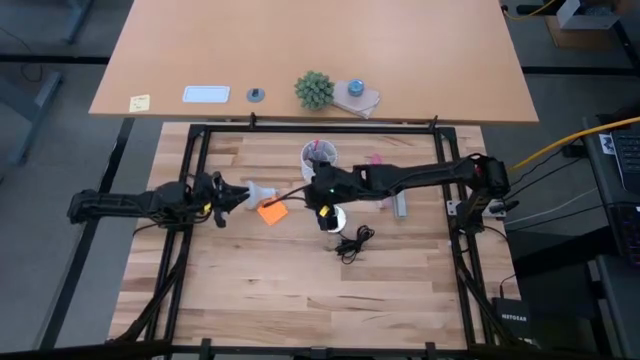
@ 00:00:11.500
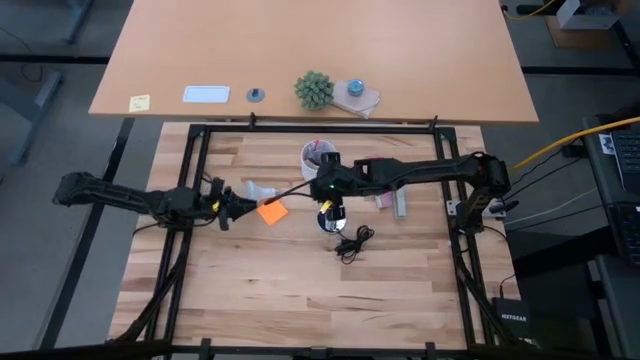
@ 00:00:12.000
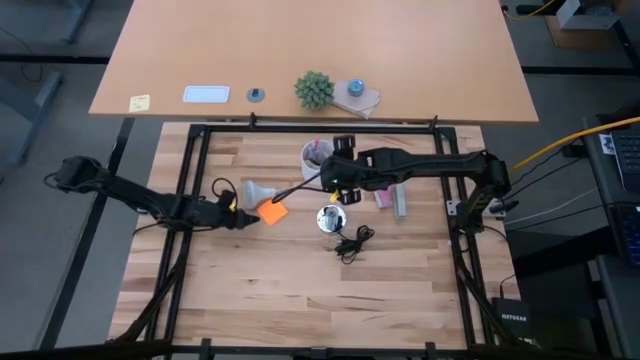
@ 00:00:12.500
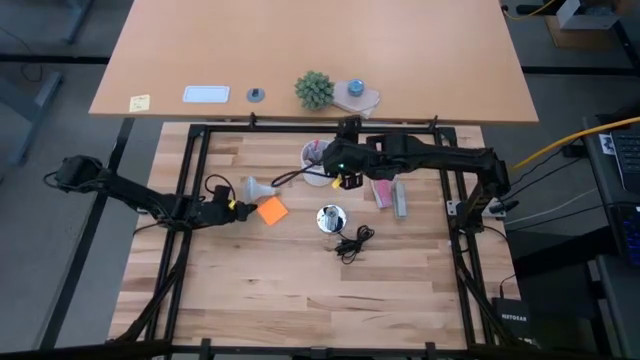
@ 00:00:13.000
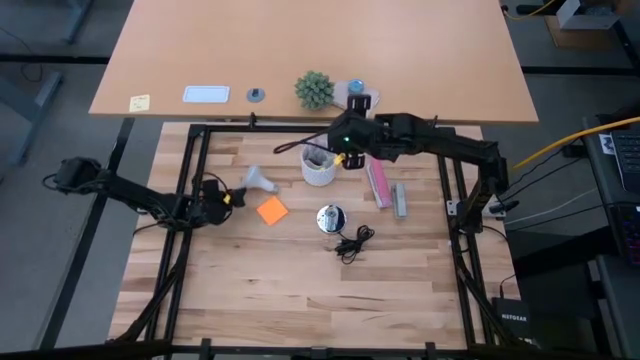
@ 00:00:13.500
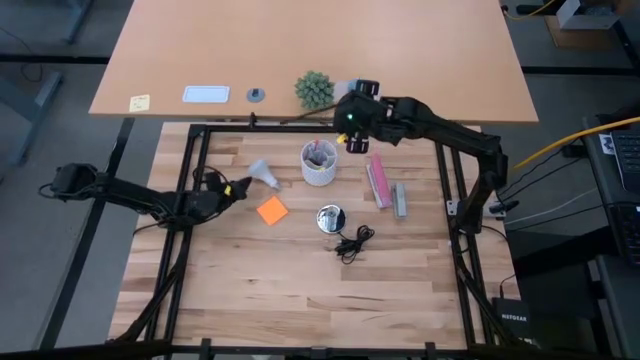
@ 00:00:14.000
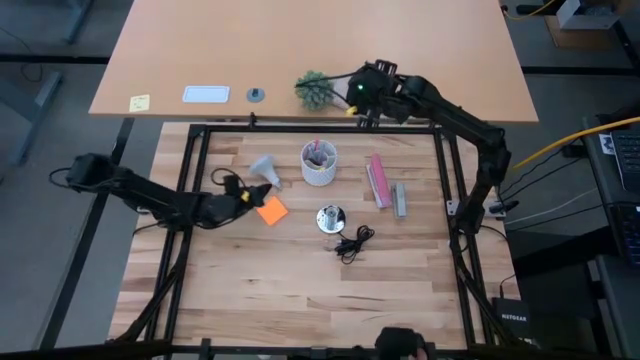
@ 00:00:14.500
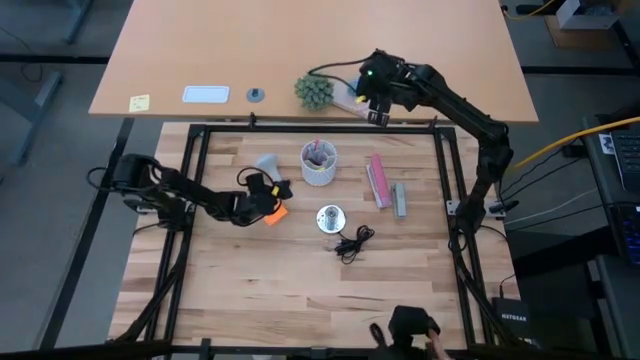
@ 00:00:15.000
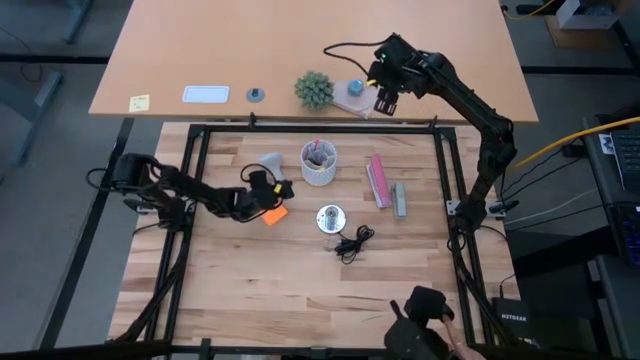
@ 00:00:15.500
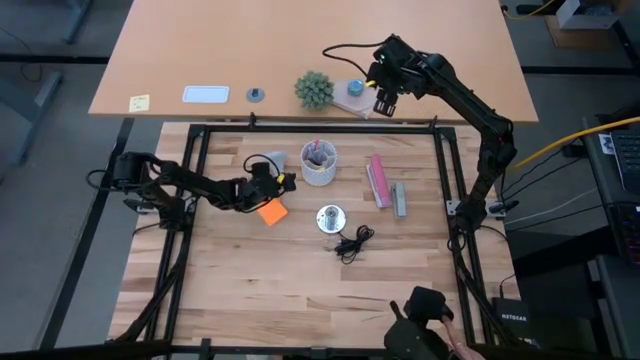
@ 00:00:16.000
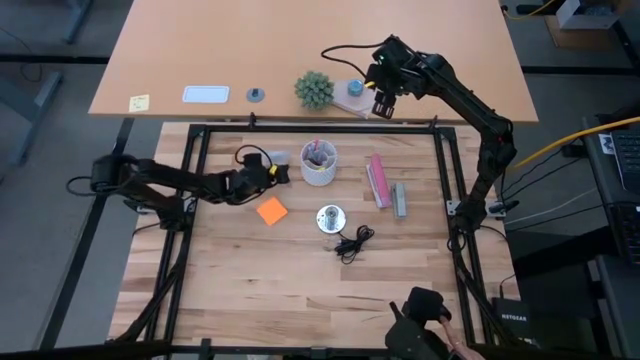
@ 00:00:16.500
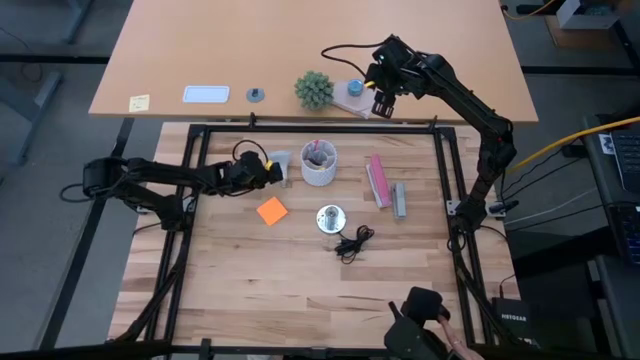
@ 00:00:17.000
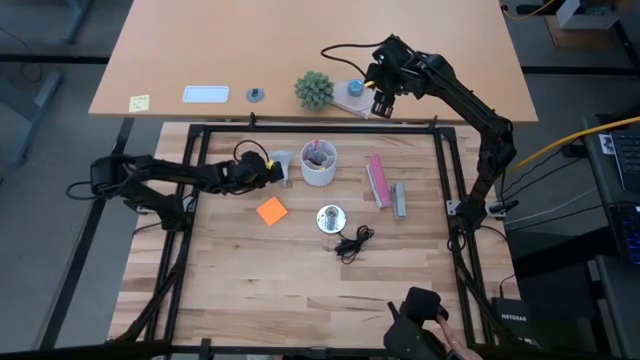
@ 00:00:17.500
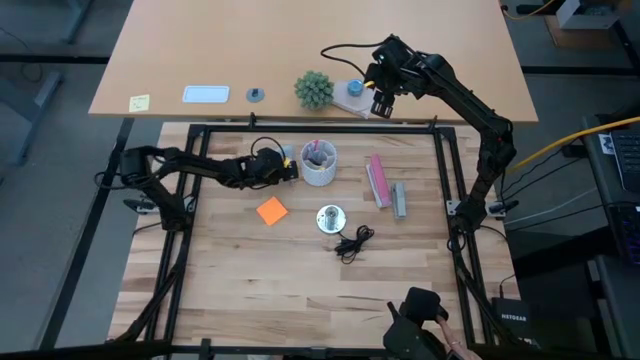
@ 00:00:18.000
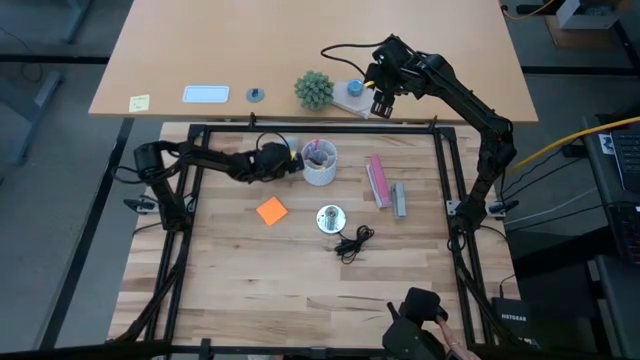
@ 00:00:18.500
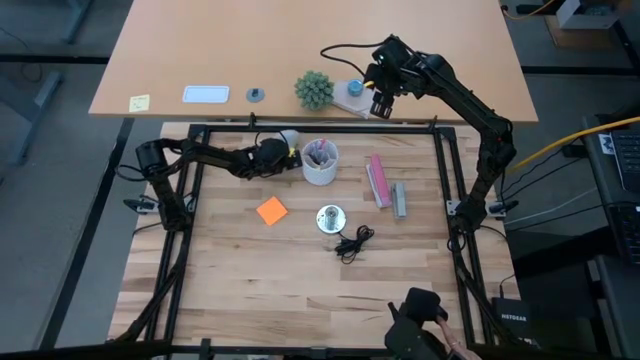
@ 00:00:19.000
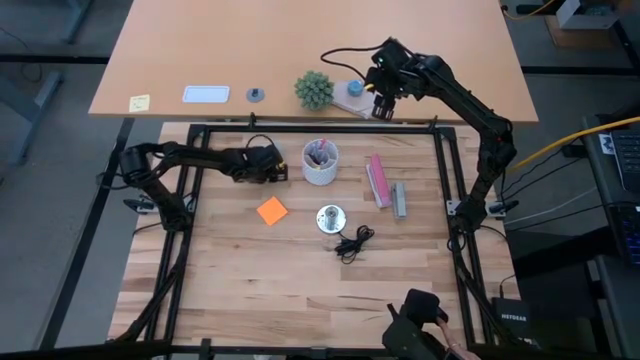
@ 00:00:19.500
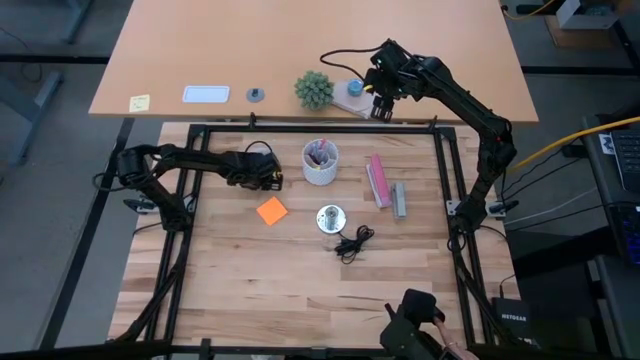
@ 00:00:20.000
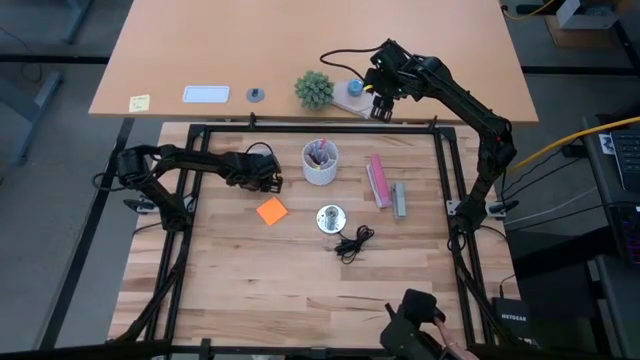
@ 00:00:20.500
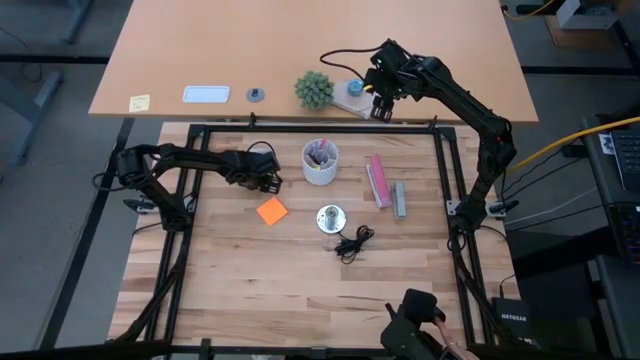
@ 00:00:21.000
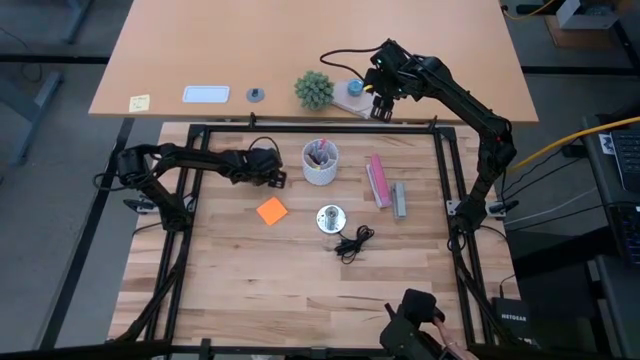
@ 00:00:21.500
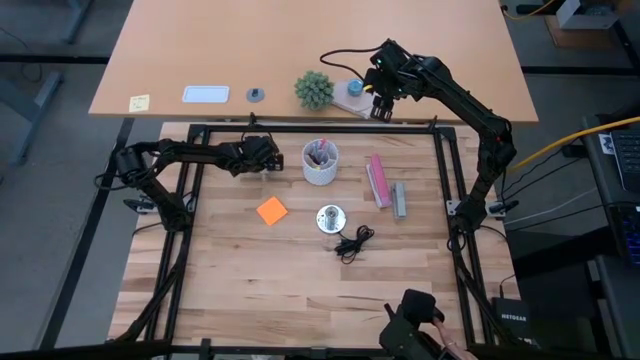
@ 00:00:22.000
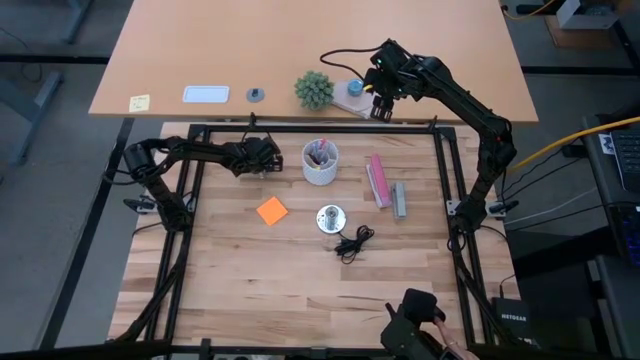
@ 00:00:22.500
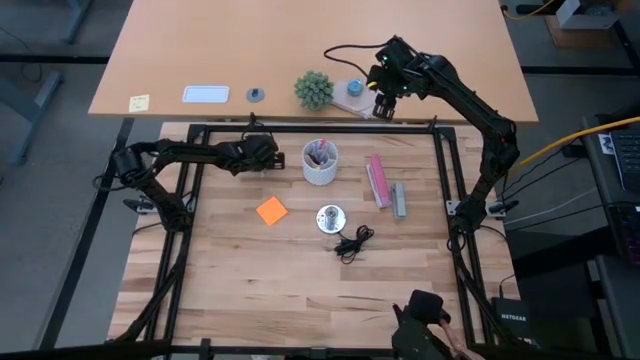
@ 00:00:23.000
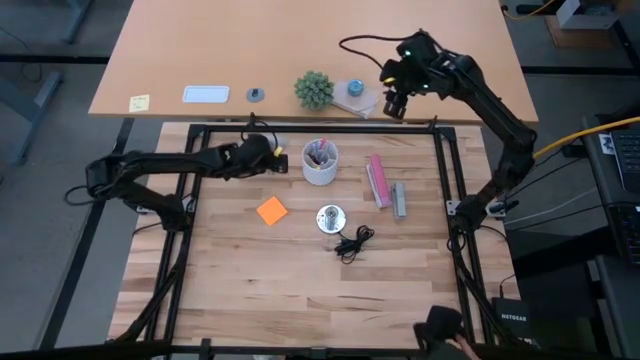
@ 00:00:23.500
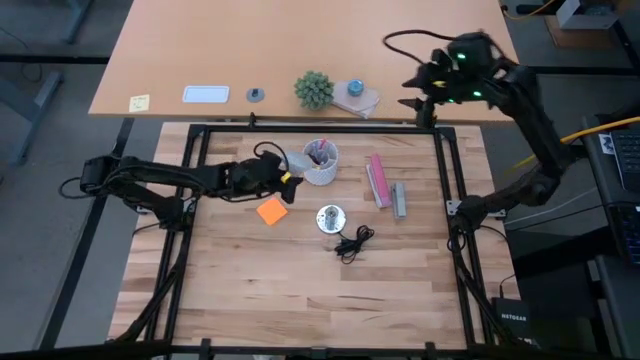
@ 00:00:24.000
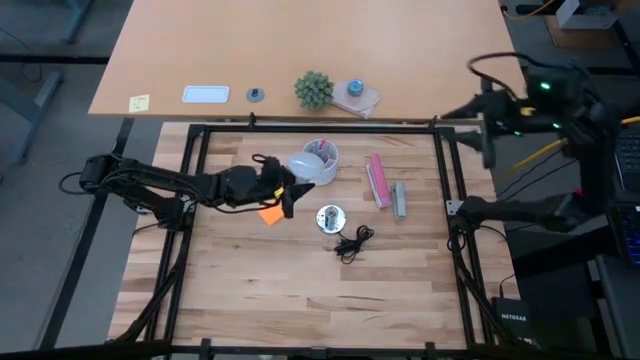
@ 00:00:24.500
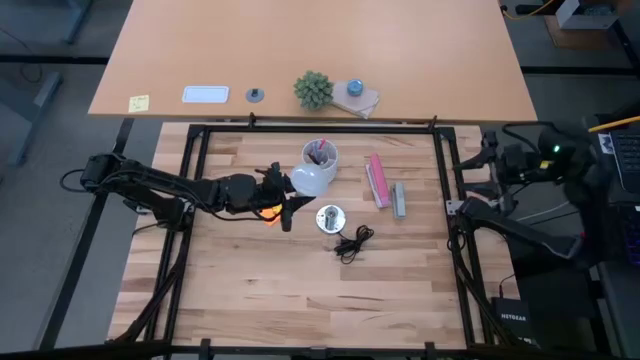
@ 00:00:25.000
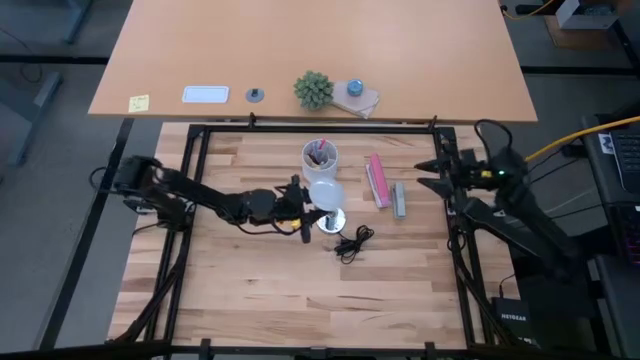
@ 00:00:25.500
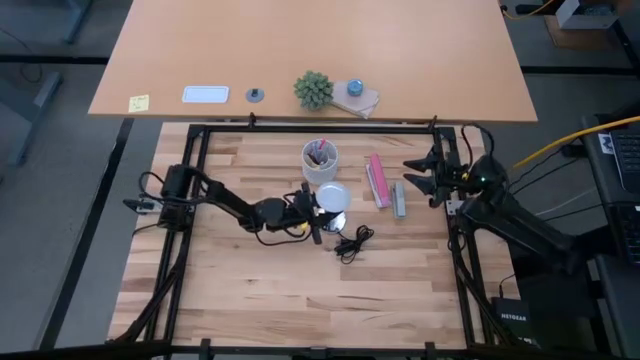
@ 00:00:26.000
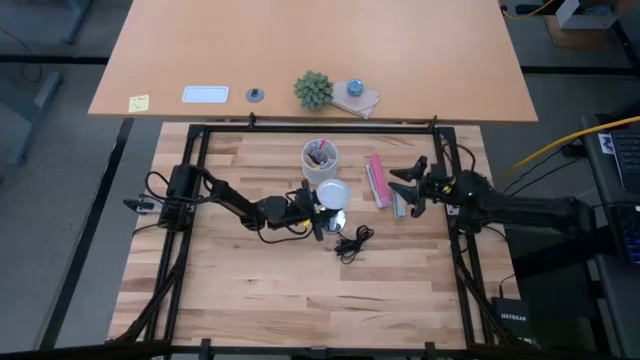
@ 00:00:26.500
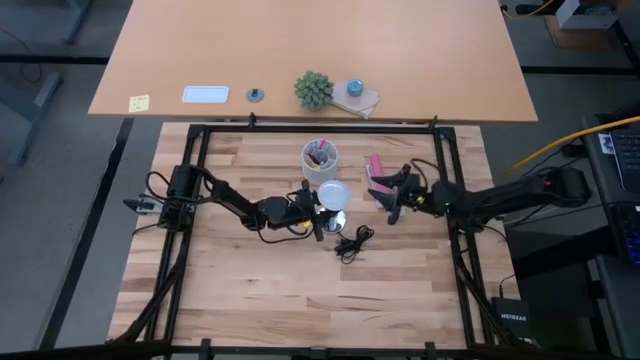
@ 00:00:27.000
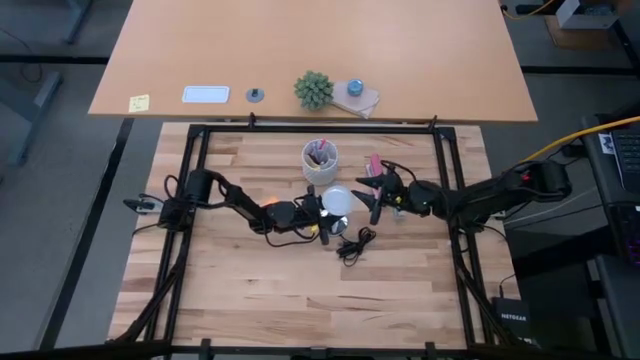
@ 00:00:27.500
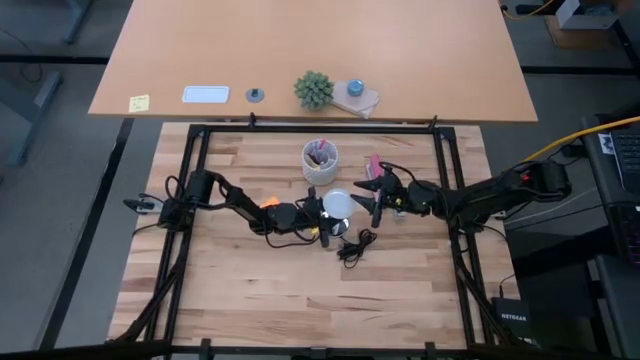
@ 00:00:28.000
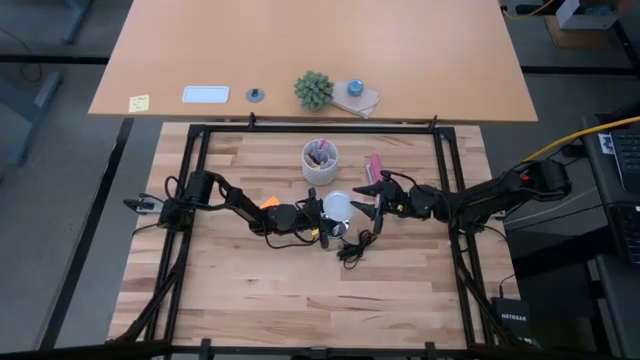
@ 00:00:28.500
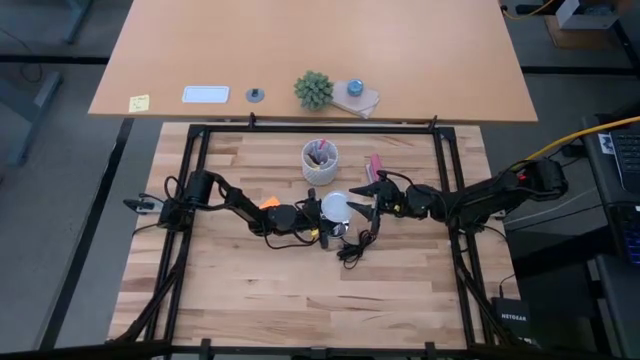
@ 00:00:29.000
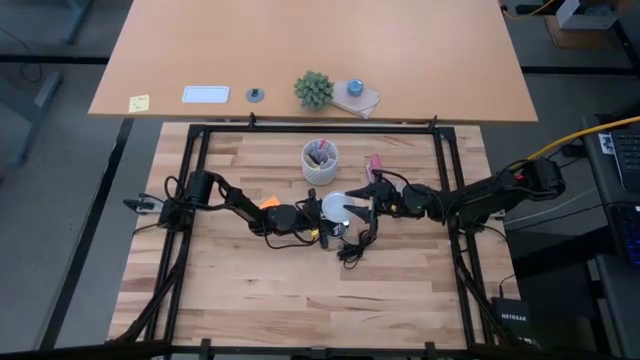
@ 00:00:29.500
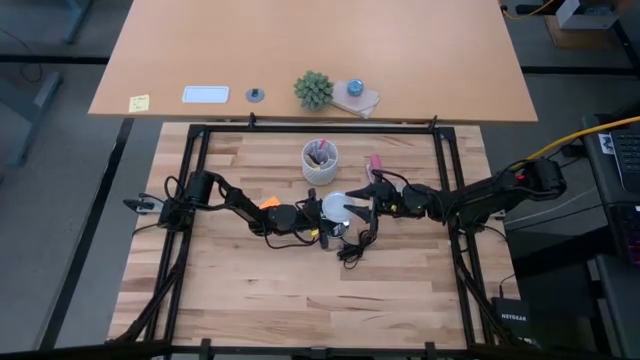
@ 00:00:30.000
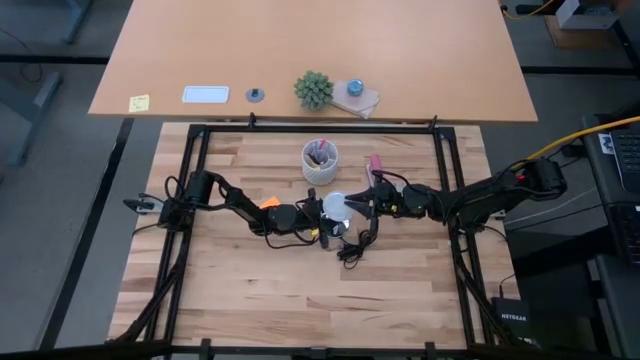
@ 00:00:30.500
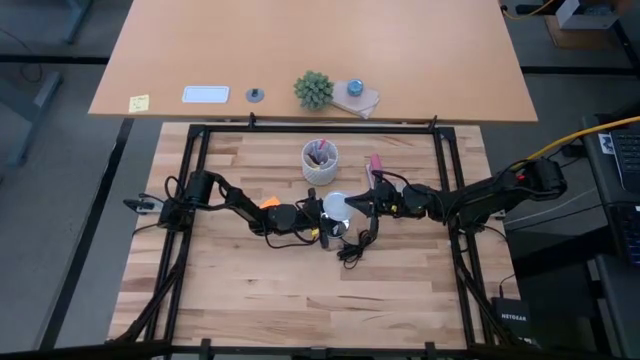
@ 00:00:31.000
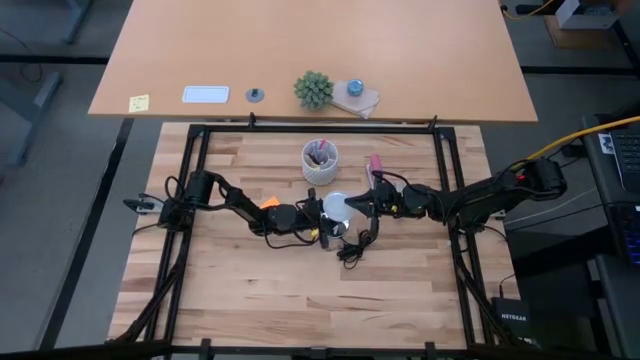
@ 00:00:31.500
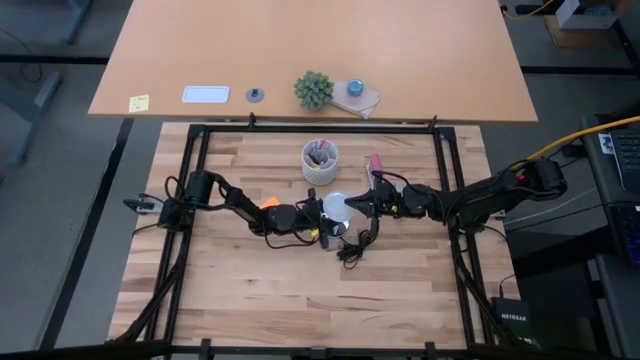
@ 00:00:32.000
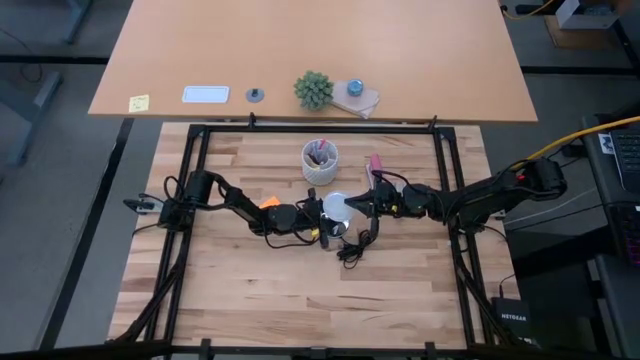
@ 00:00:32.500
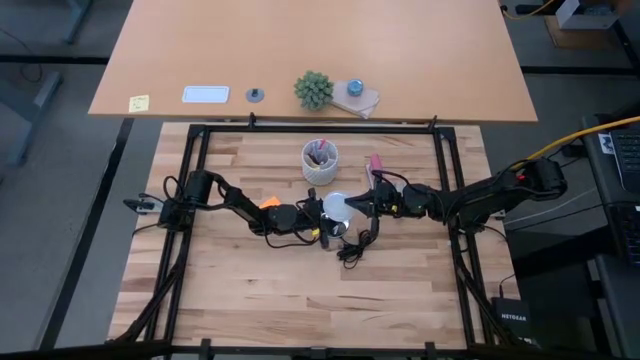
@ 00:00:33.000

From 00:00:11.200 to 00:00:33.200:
Task: Screw lightbulb
Insert the lightbulb into the lamp
